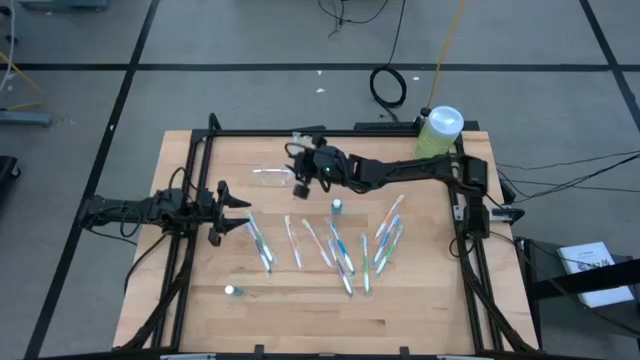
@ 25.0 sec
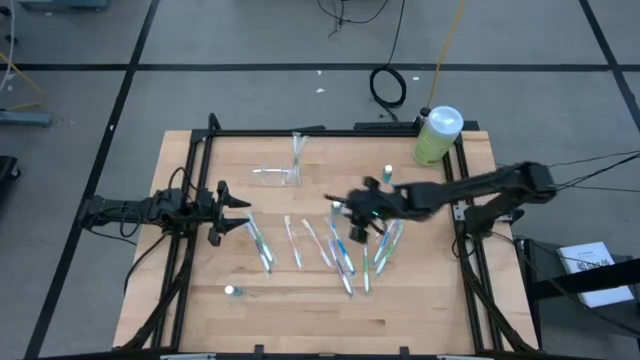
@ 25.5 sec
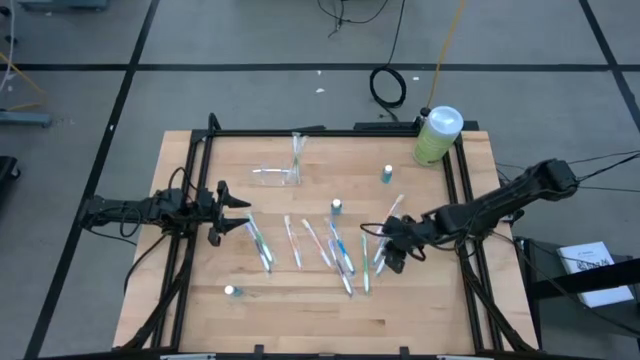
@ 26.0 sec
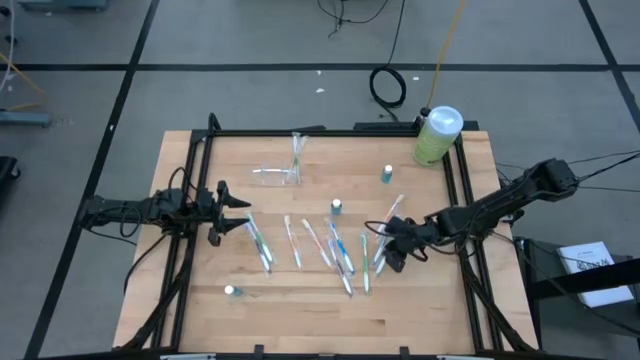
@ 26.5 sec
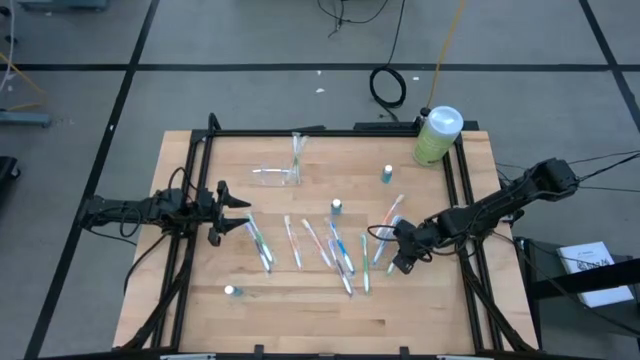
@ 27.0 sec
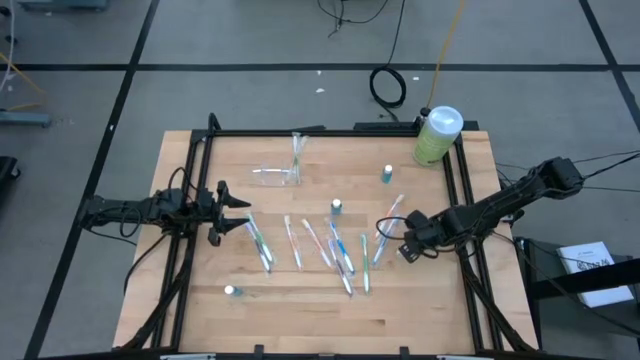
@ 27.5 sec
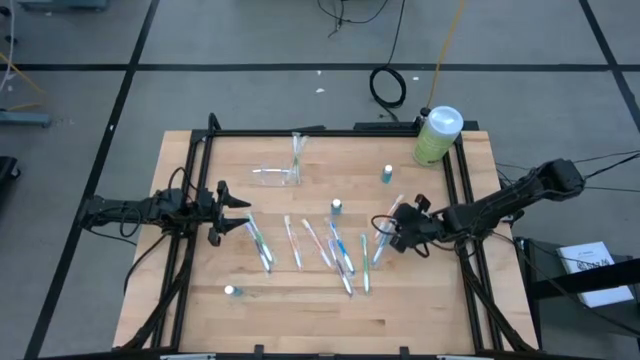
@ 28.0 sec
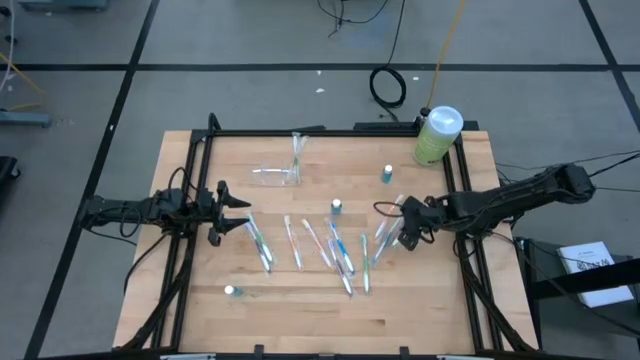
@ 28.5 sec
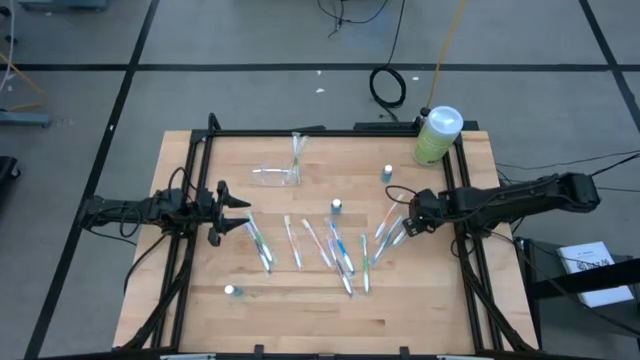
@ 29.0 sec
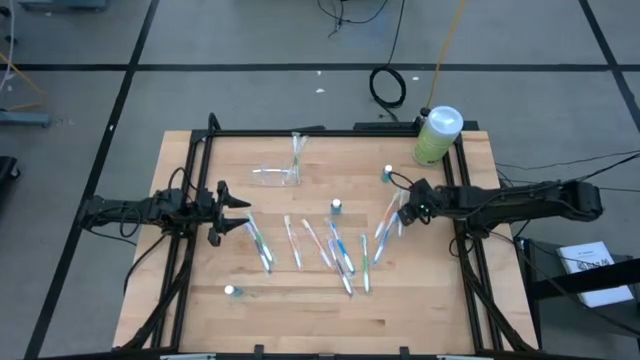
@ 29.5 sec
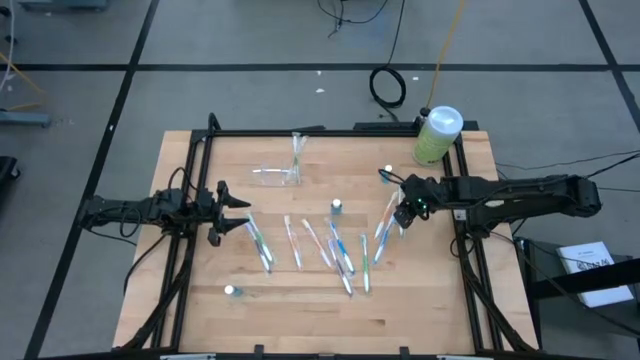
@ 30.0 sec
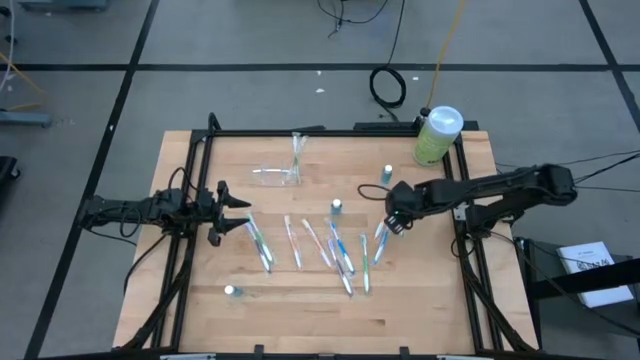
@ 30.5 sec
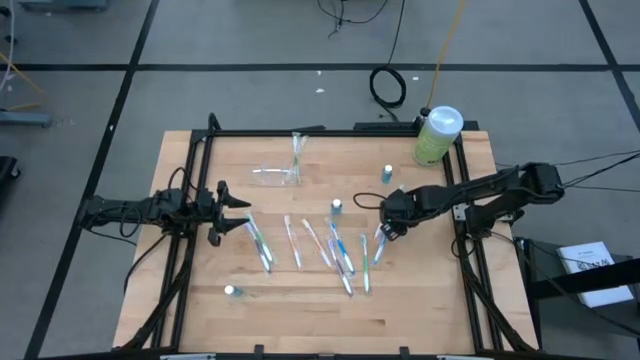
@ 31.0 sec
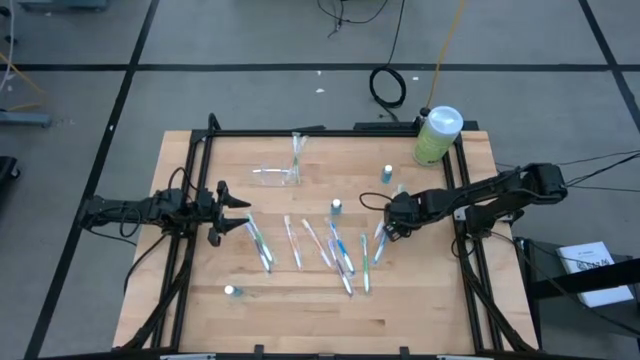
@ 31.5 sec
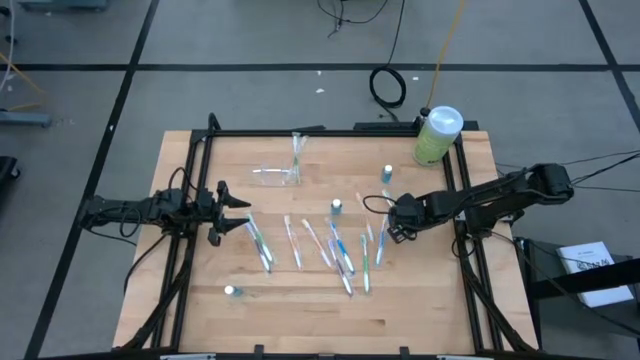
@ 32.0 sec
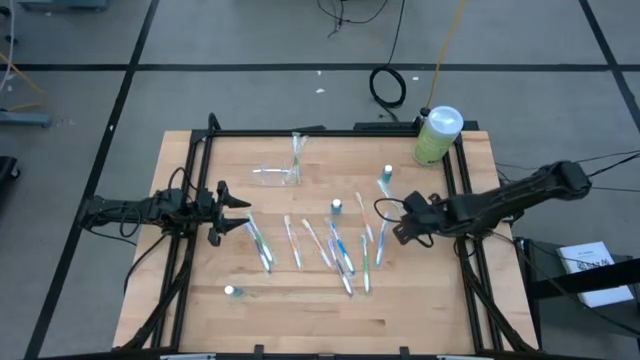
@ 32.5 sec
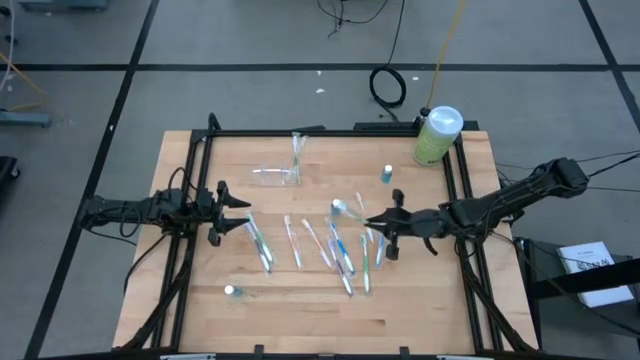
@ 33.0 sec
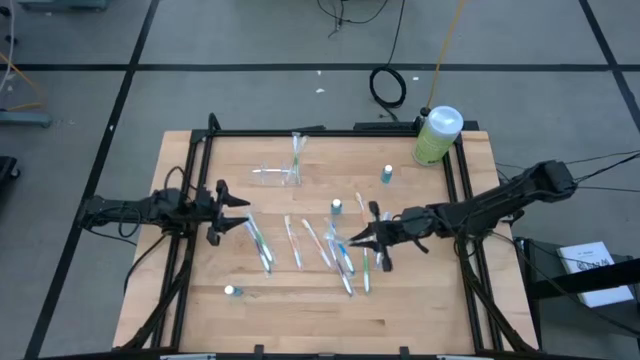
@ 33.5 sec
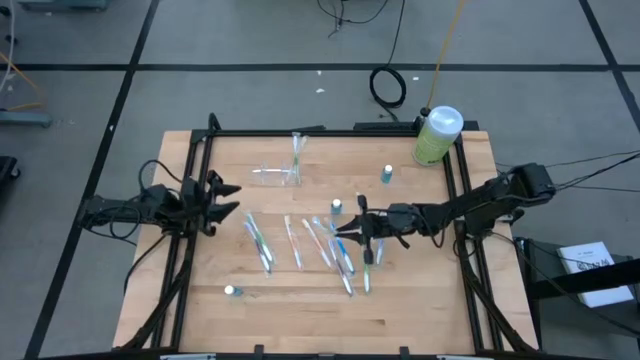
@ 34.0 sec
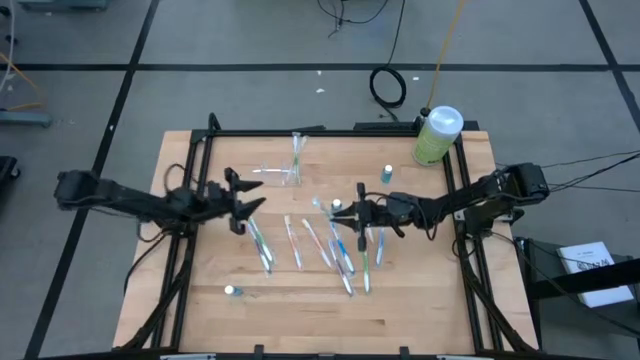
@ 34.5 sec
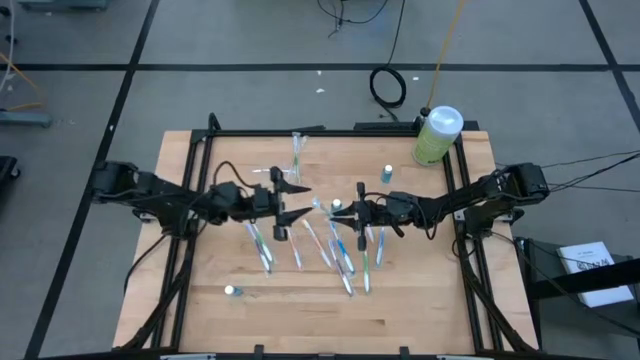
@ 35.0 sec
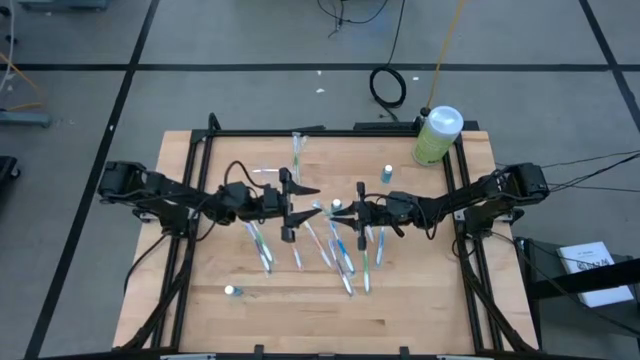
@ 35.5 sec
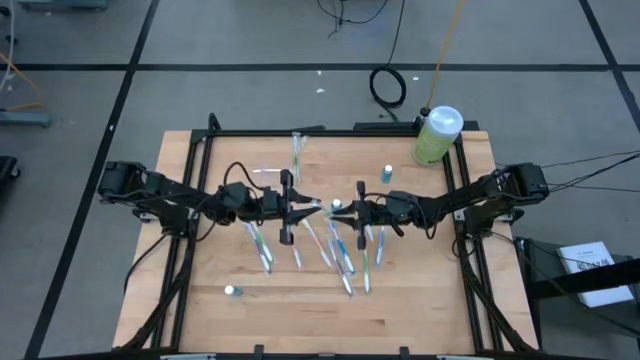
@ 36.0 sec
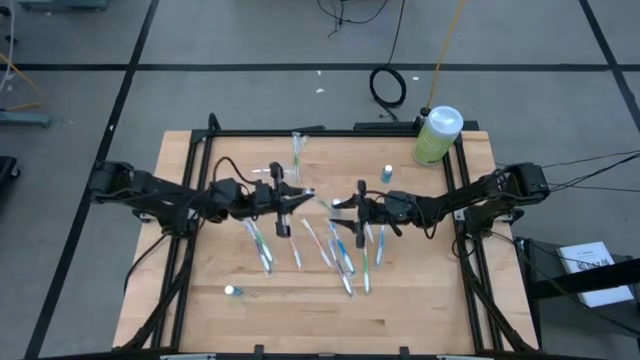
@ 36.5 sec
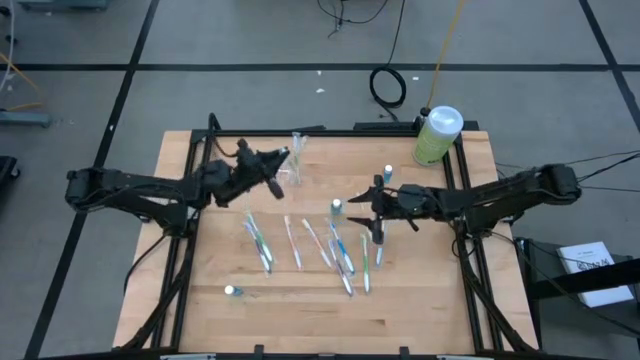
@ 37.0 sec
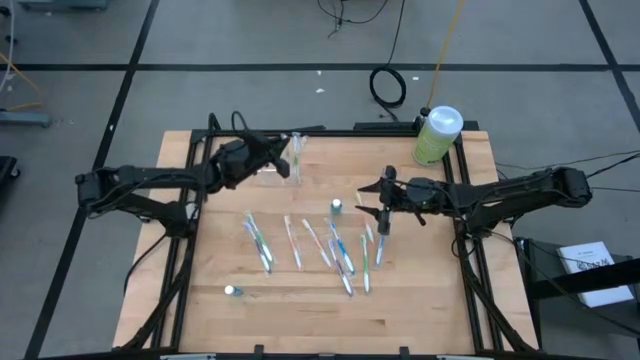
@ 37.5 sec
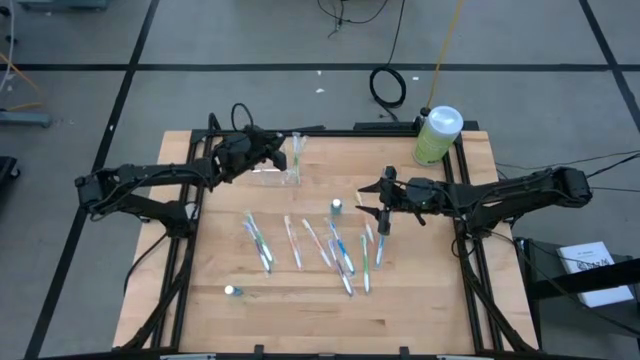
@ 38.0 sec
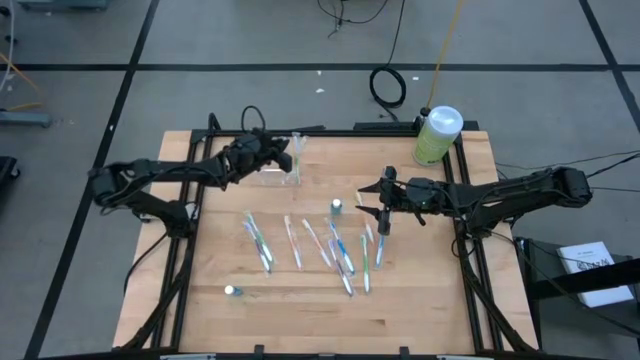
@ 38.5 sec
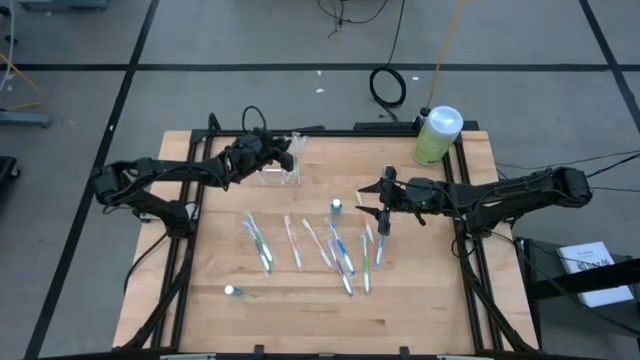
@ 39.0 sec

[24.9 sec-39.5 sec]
Task: Pick & Place toothbrushing station
Put the green toothbrush into the transparent organizer

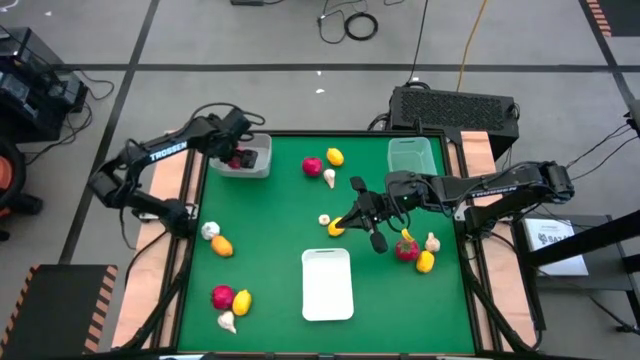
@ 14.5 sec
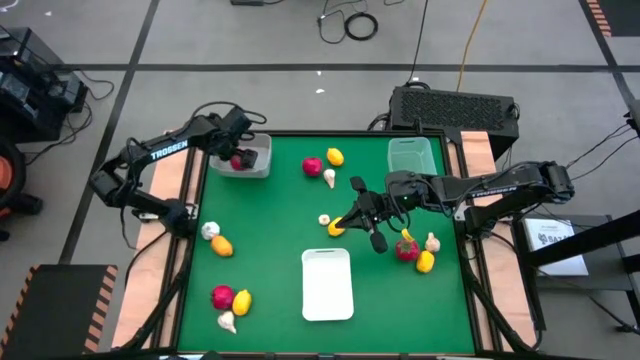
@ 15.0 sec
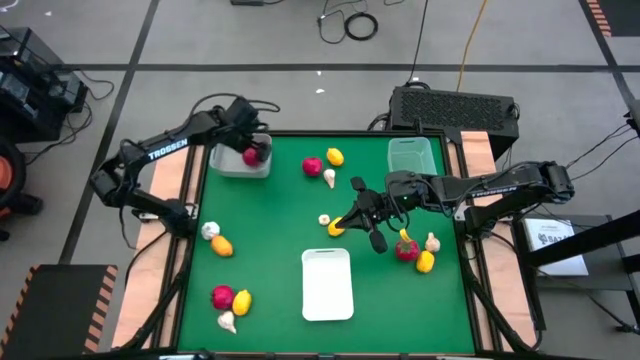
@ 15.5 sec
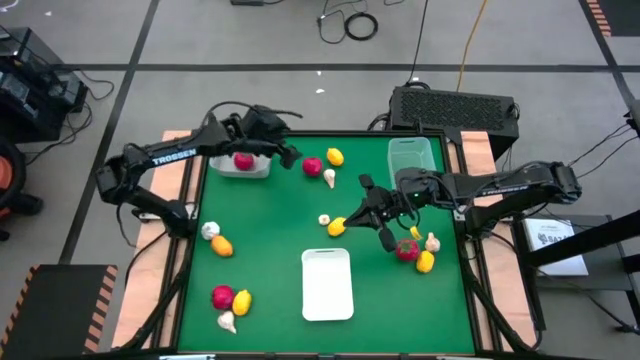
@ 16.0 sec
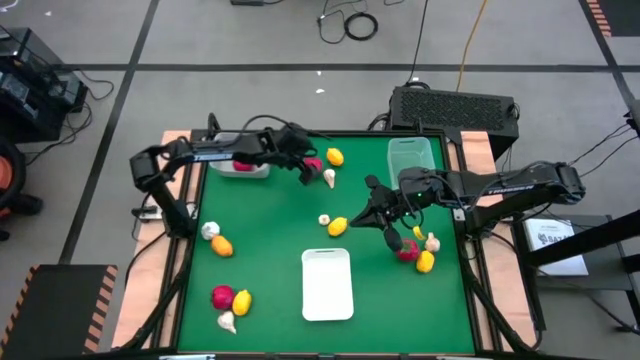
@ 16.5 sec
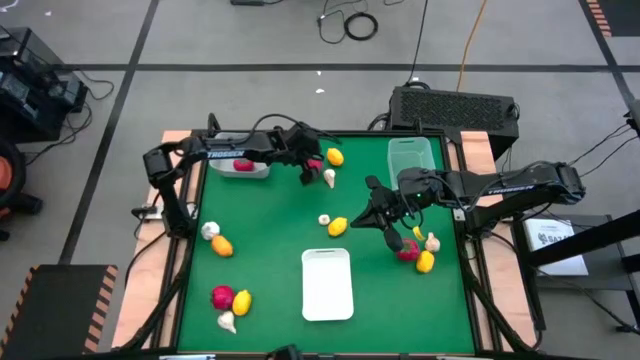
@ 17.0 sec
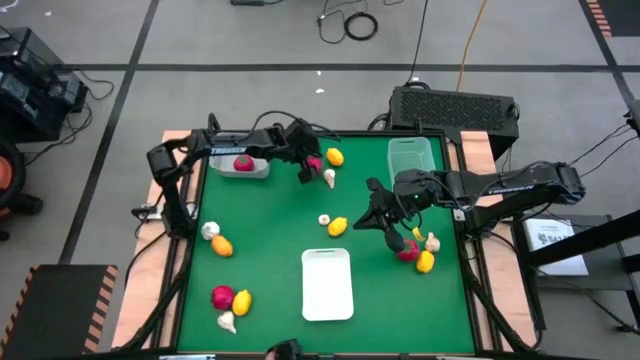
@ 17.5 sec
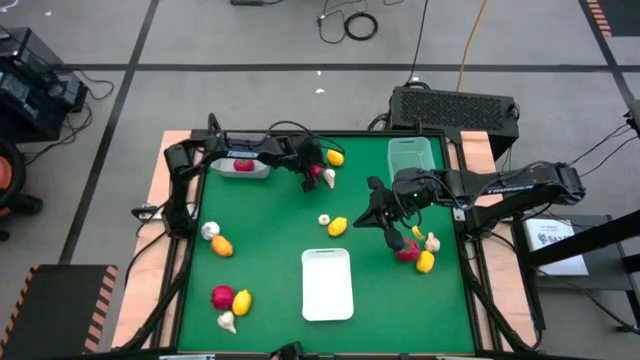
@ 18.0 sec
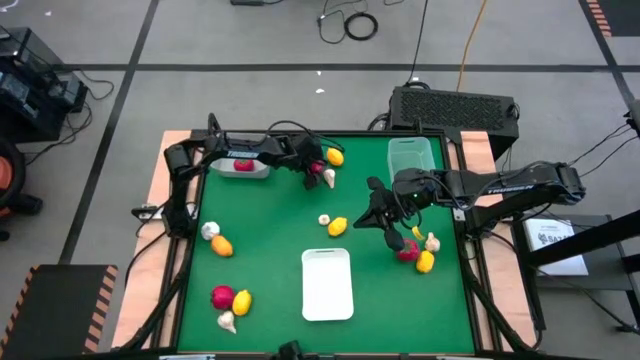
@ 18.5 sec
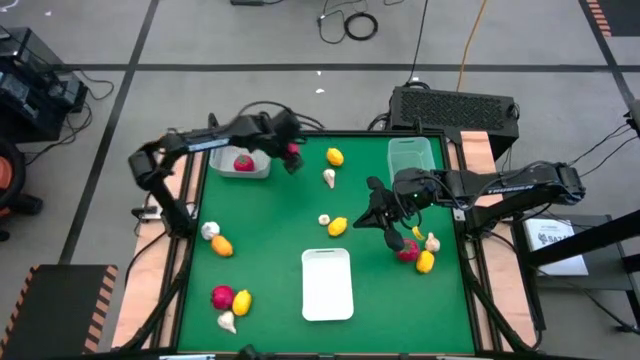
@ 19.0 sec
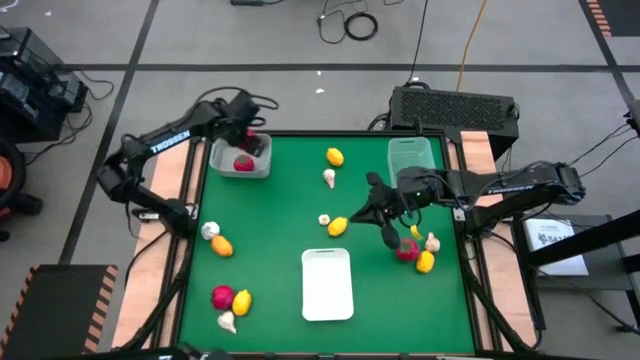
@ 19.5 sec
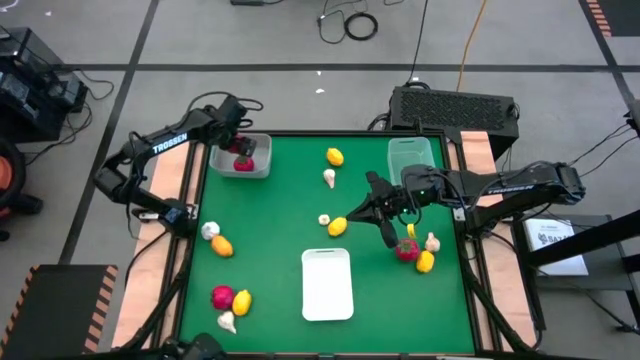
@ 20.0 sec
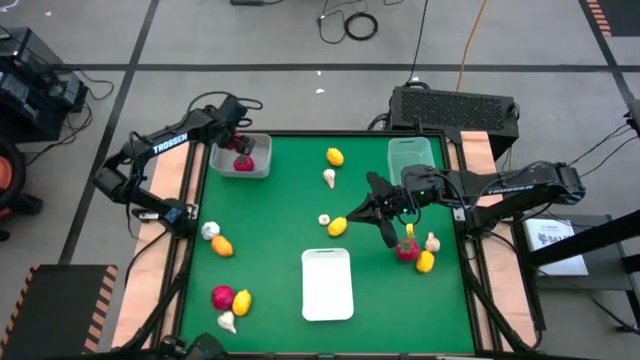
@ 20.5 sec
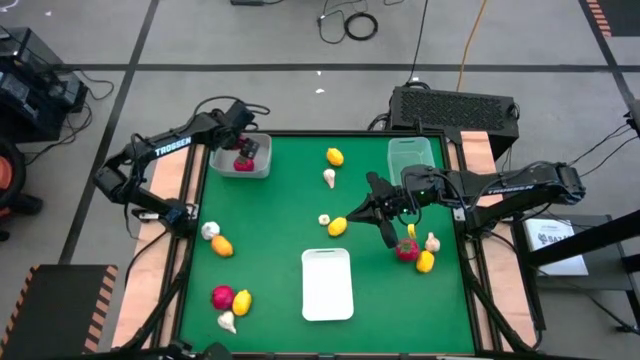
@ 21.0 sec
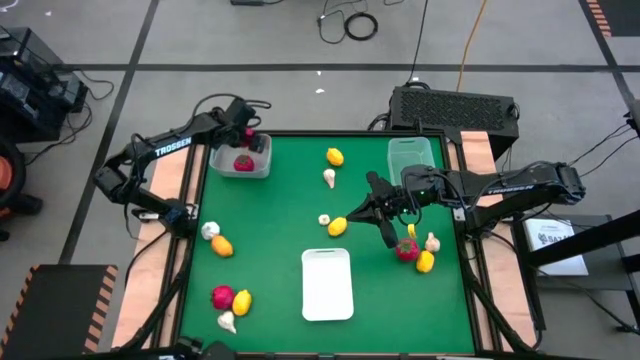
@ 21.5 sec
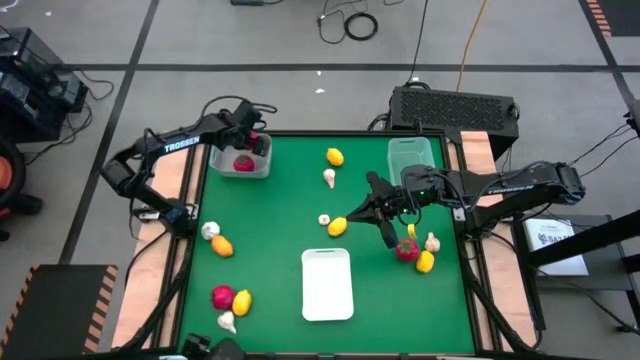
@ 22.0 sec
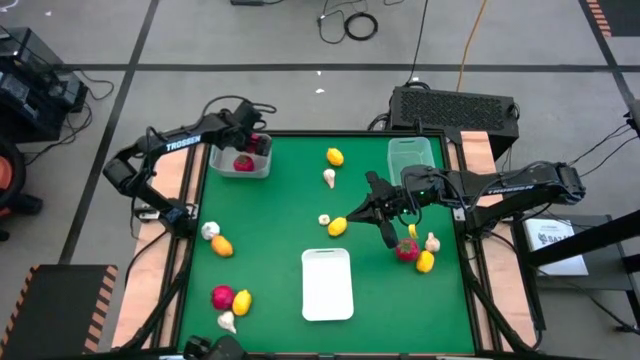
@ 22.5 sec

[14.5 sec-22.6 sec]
Task: Sort produce into baskets
Put the top center tomato into the gray bin
